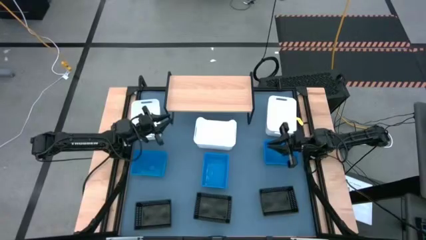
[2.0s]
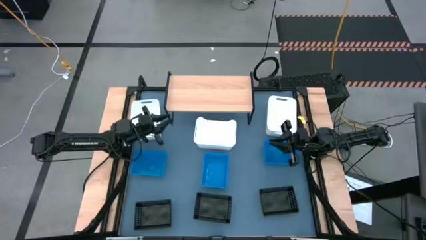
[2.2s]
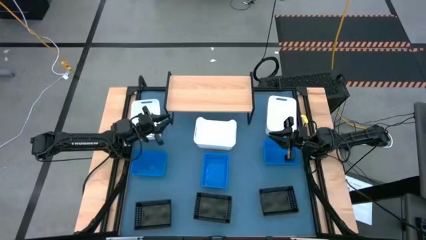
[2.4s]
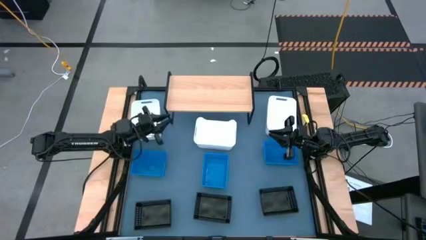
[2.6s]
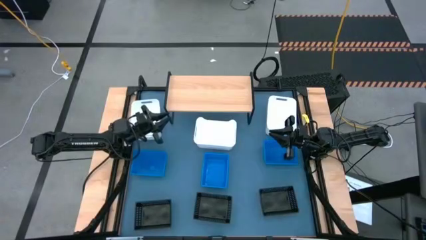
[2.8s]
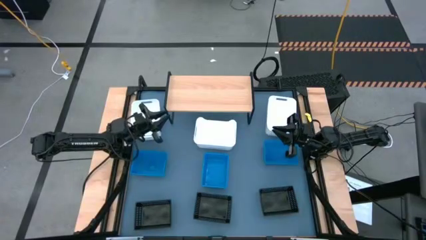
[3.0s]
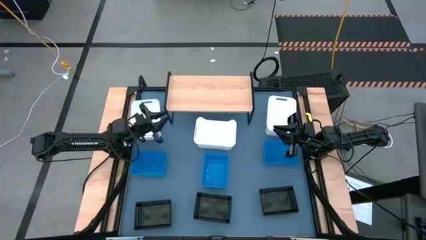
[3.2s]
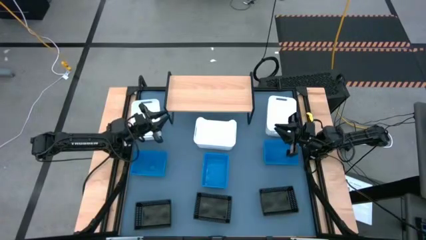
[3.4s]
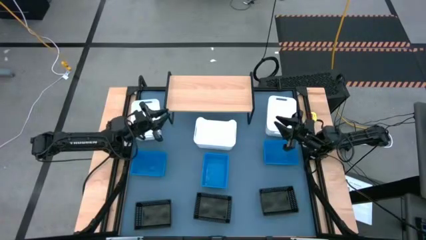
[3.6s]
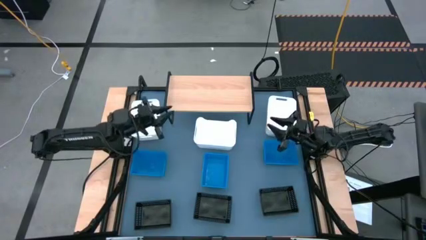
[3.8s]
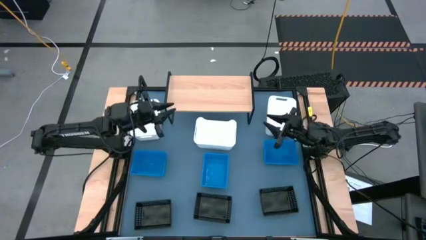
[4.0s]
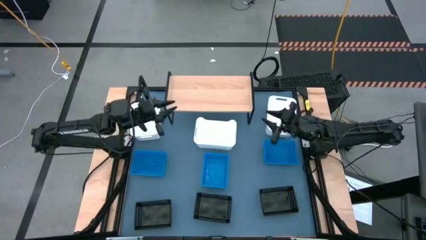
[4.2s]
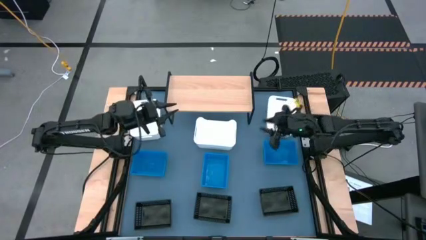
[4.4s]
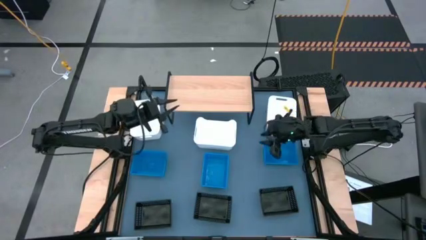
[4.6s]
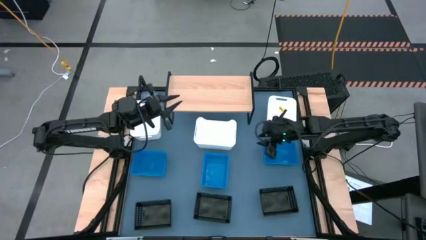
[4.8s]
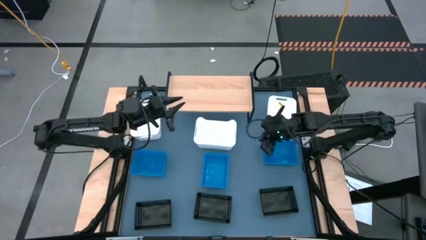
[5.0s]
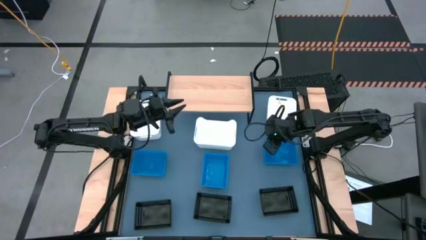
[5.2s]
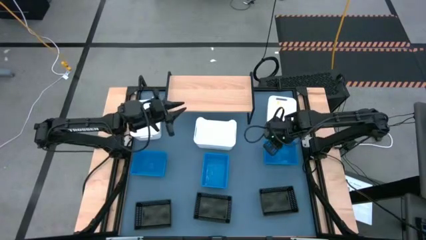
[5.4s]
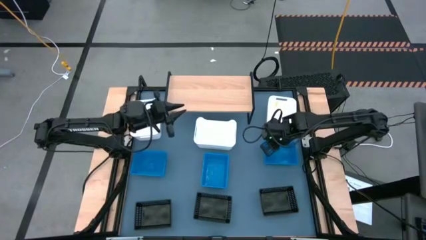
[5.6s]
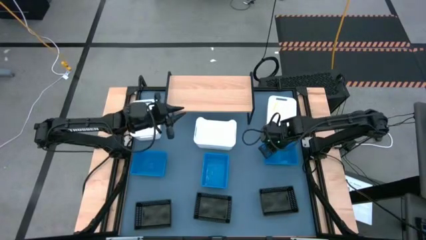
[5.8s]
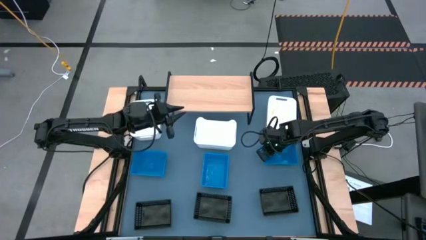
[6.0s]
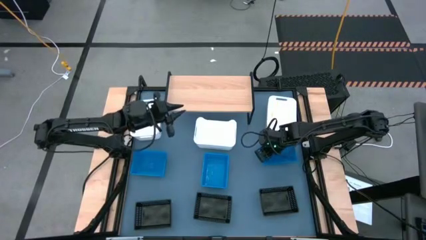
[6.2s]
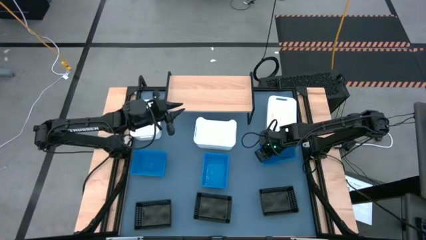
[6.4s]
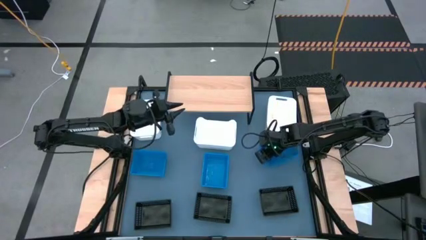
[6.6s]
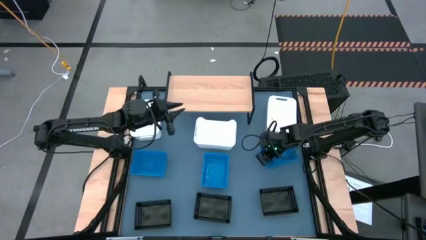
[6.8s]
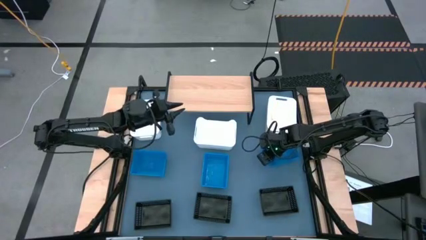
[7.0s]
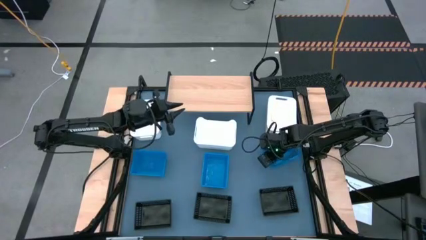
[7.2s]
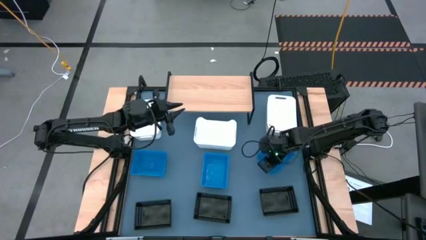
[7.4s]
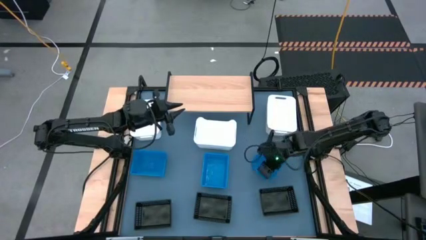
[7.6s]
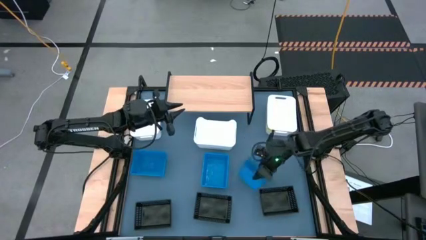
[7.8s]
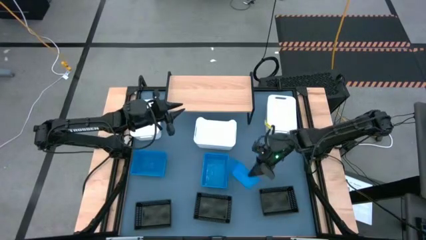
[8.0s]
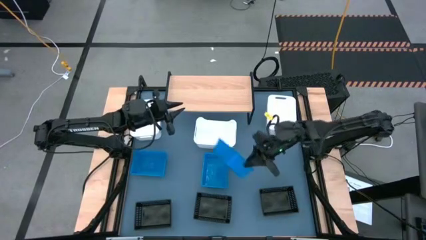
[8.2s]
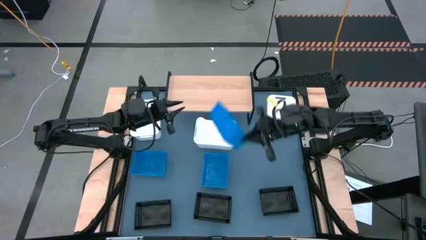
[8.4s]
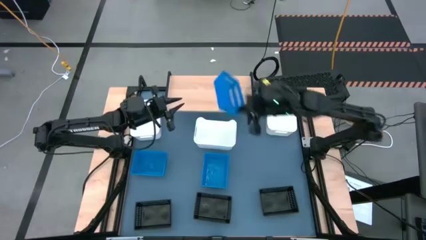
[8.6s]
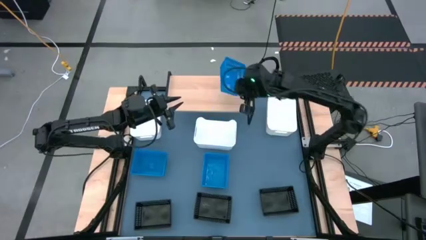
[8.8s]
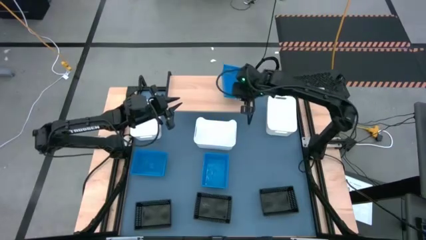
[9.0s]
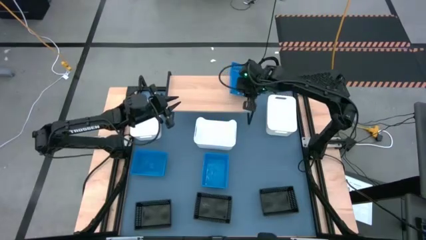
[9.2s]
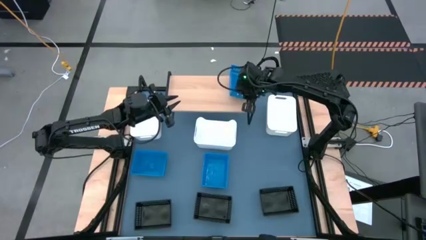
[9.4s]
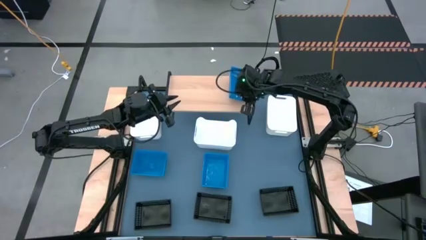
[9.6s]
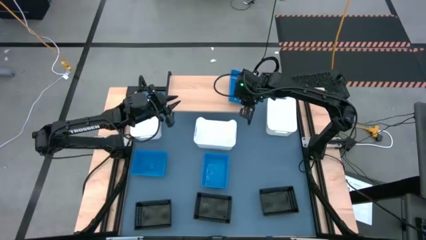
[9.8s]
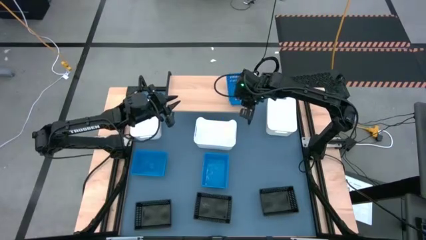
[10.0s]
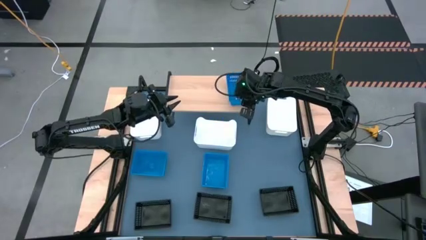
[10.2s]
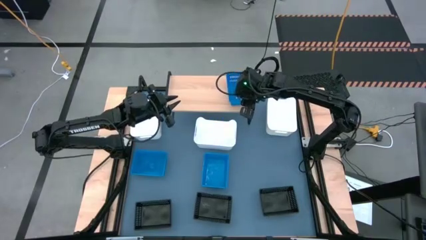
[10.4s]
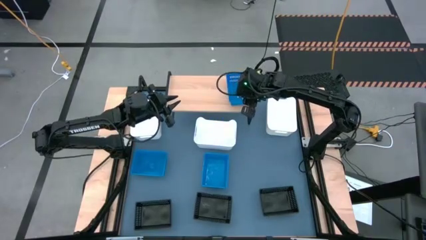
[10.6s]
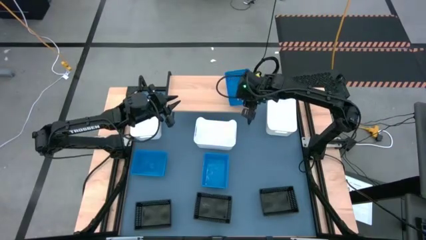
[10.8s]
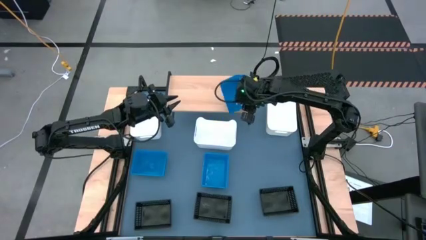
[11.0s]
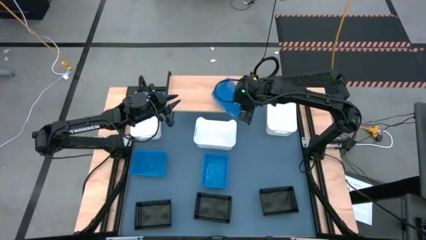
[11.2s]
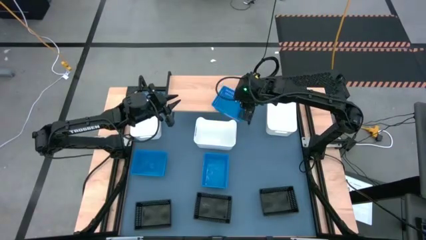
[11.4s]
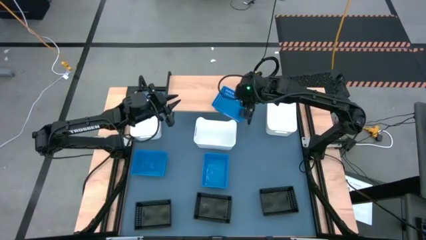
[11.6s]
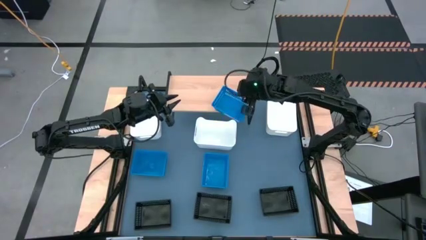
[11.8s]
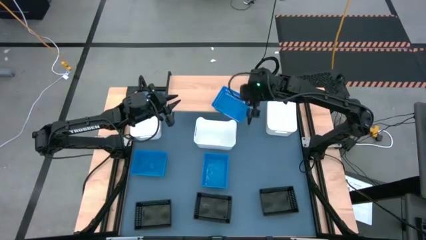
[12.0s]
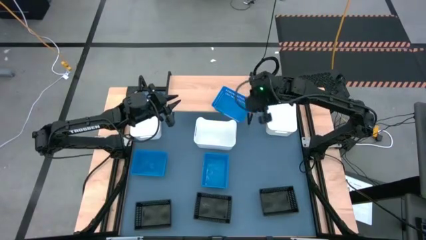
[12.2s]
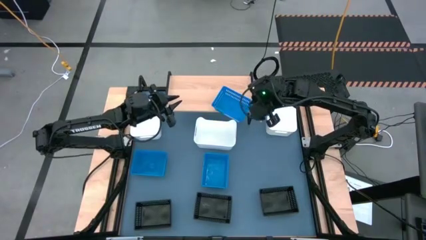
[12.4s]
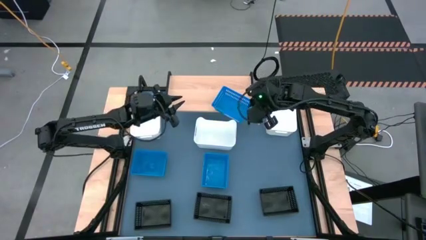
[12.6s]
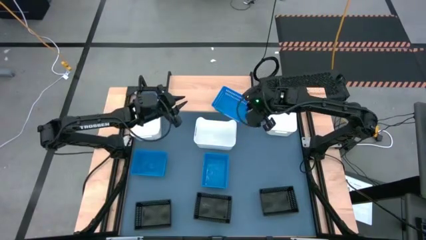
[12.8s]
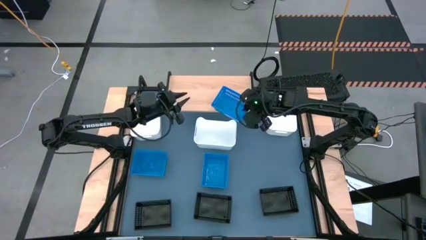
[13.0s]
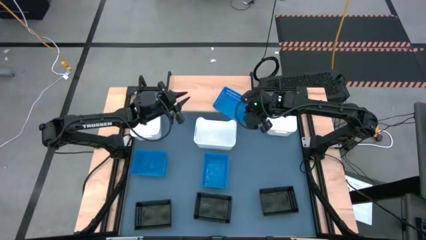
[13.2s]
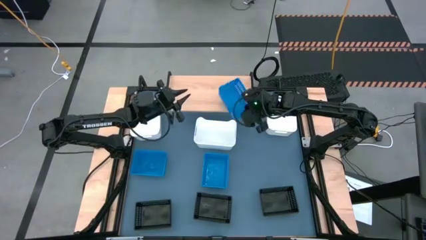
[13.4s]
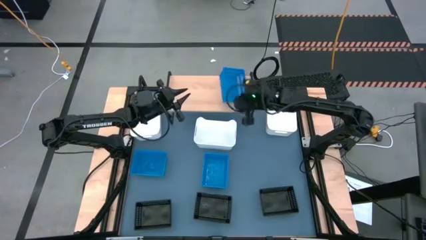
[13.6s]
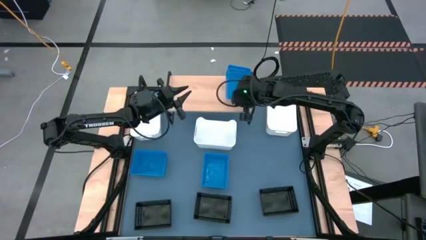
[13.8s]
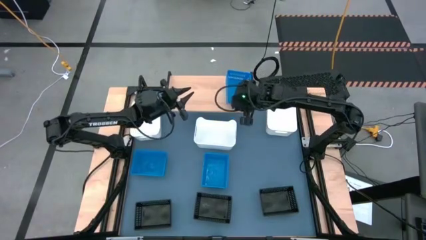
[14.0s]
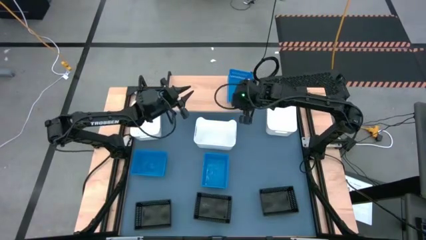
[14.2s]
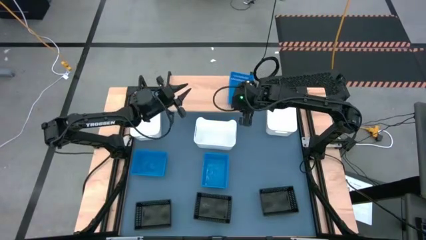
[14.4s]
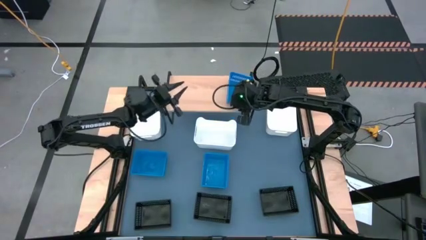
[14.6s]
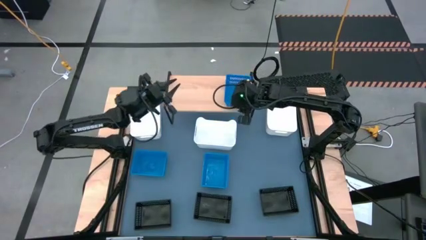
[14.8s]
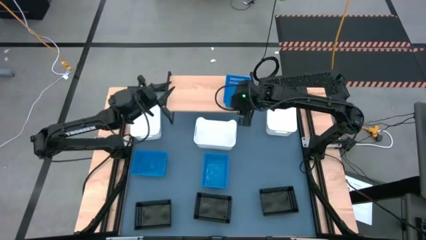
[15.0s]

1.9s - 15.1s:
Task: Stack baskets on shelf by color
Put the right blue bin on the shelf

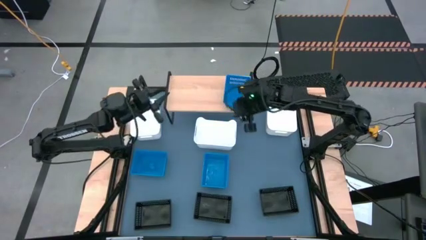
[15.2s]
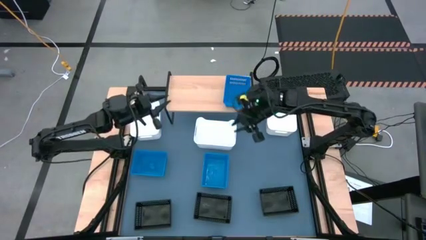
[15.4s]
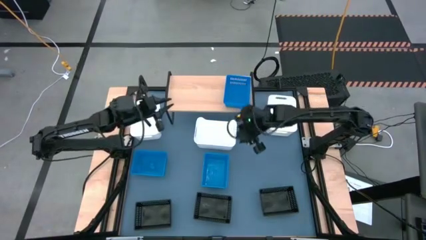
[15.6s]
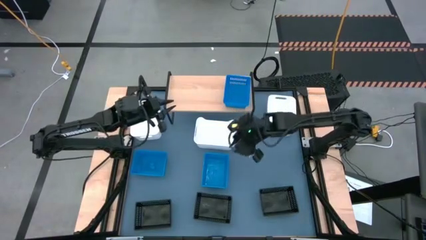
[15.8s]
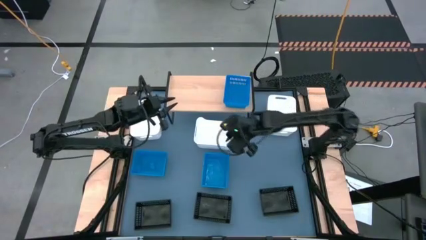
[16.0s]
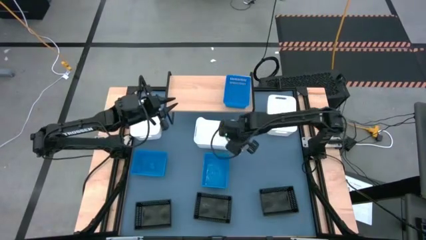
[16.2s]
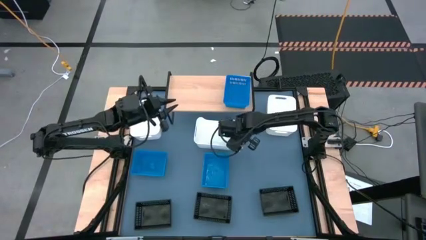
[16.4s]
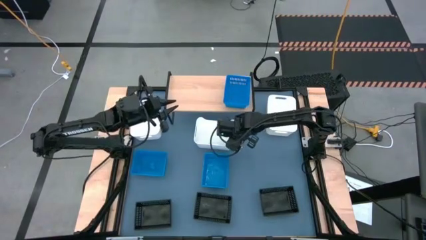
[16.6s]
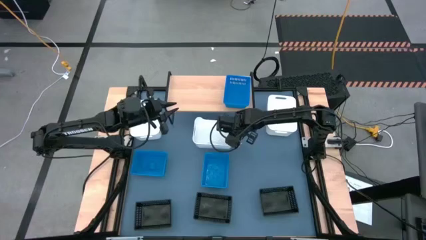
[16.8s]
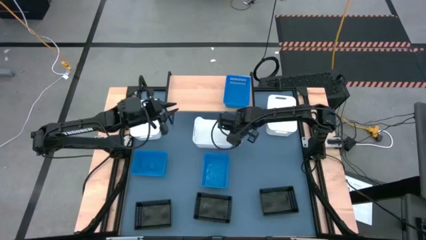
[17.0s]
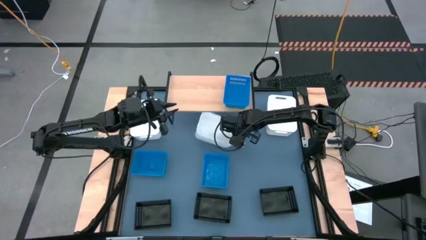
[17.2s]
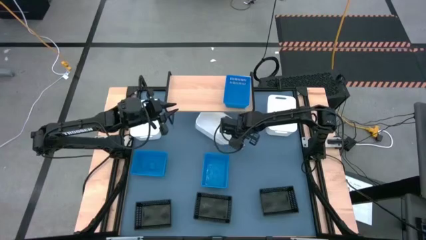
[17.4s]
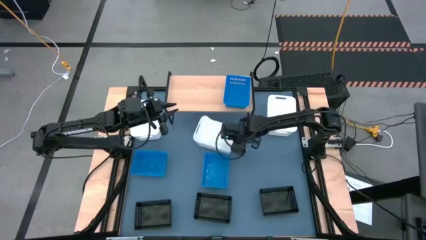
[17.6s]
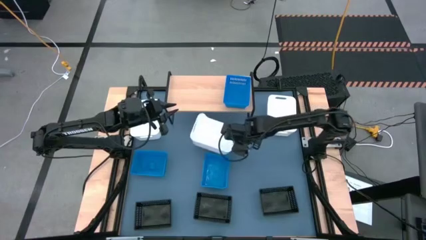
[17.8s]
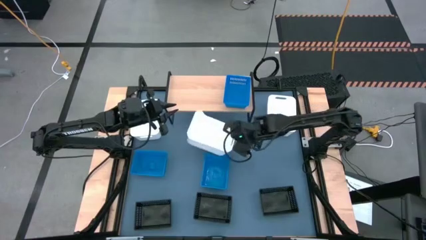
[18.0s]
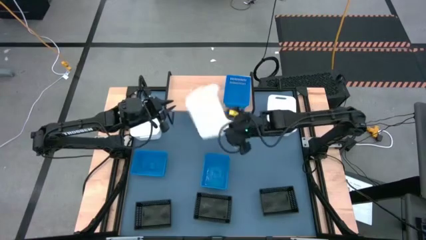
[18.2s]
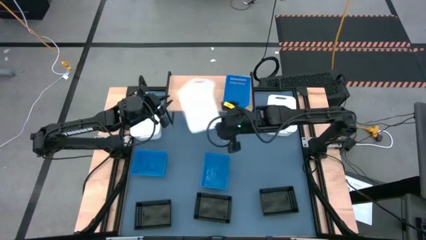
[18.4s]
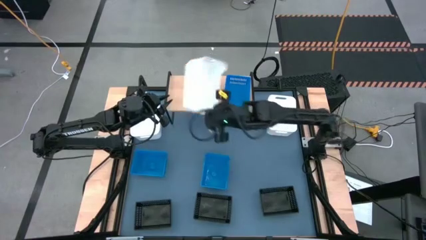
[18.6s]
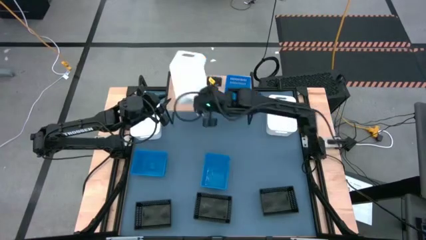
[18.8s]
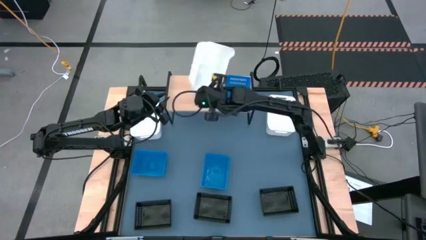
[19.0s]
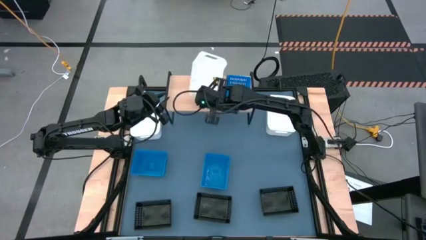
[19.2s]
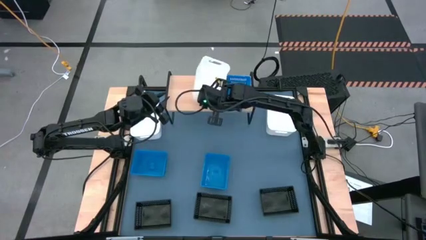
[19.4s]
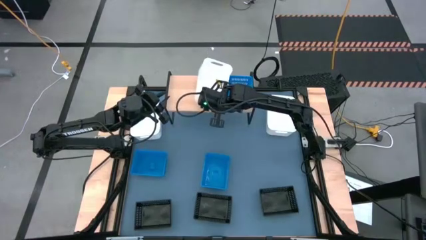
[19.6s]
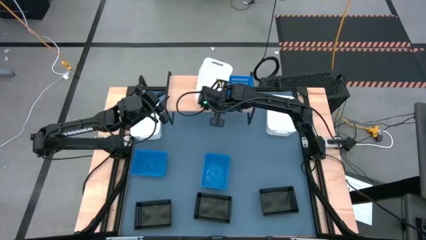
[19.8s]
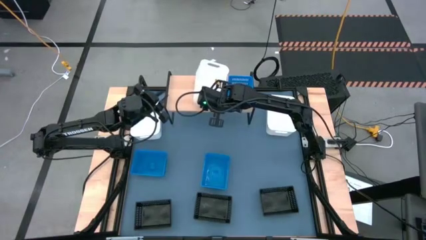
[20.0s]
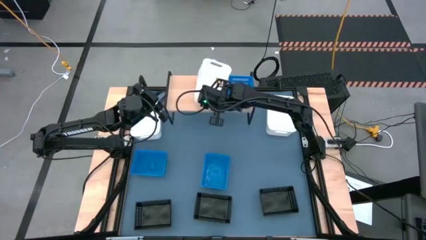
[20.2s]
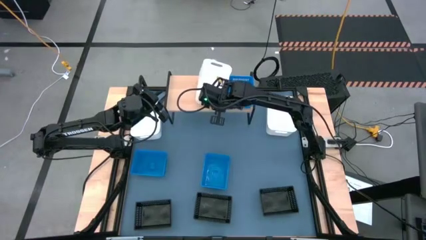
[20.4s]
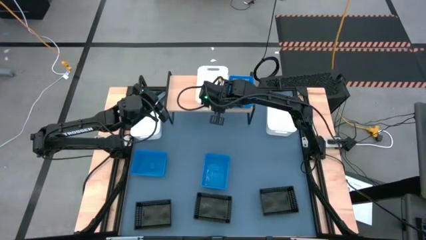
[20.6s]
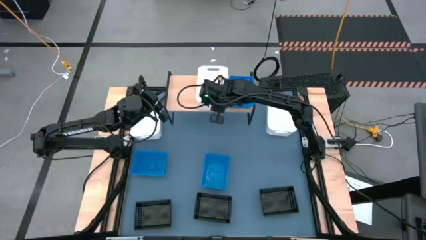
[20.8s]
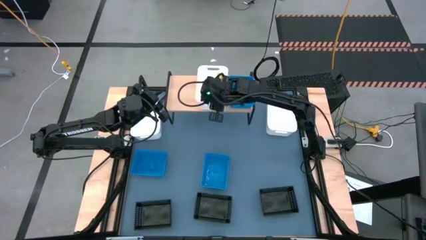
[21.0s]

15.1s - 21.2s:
Put the middle white bin on the shelf
